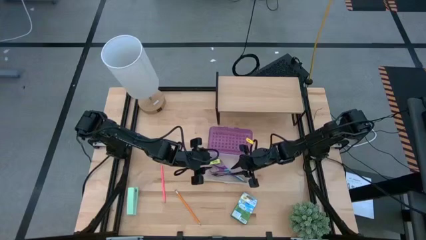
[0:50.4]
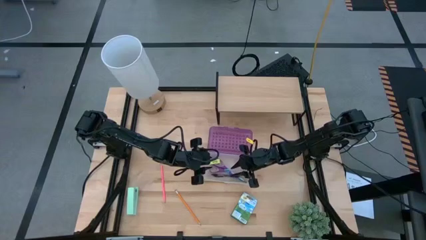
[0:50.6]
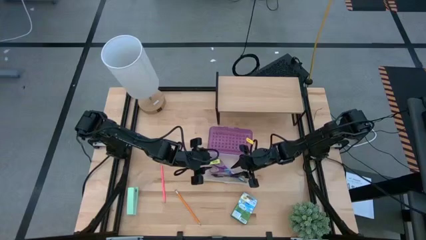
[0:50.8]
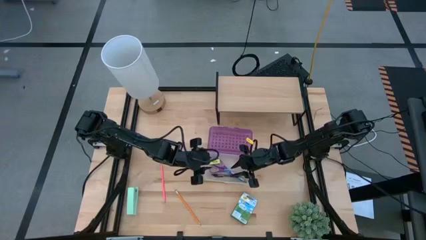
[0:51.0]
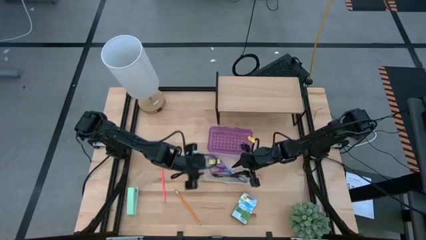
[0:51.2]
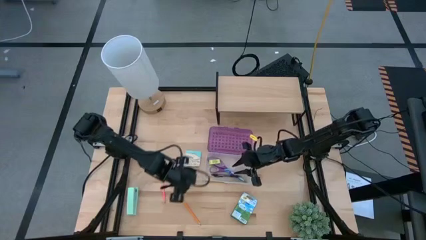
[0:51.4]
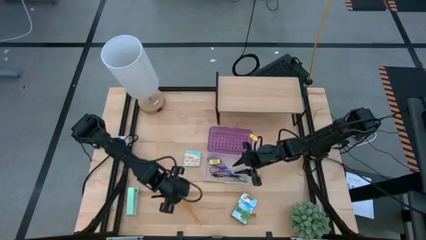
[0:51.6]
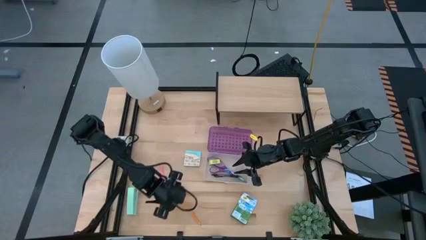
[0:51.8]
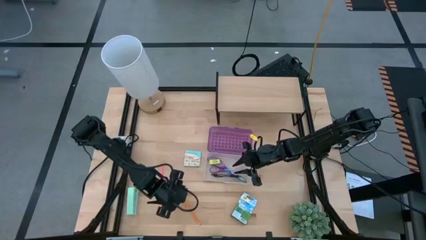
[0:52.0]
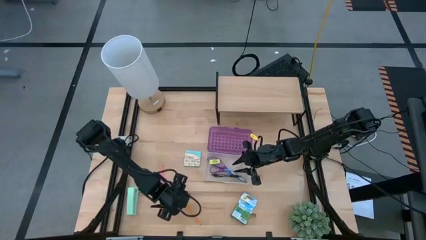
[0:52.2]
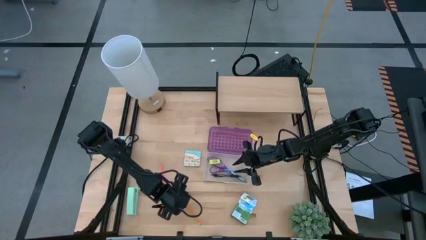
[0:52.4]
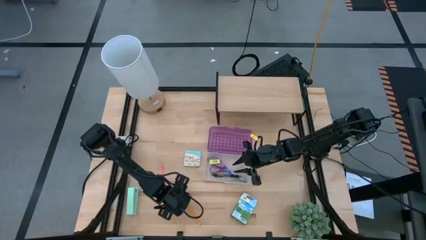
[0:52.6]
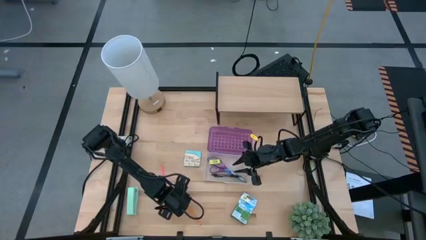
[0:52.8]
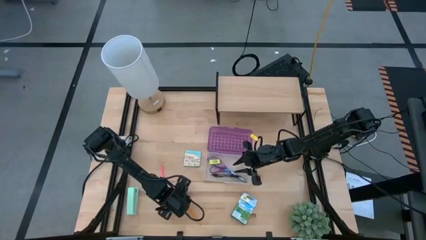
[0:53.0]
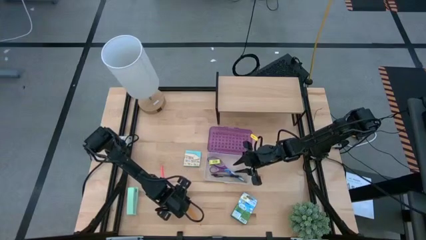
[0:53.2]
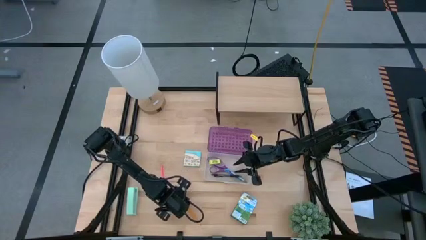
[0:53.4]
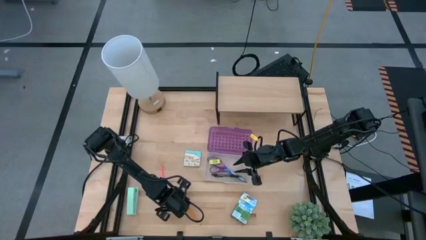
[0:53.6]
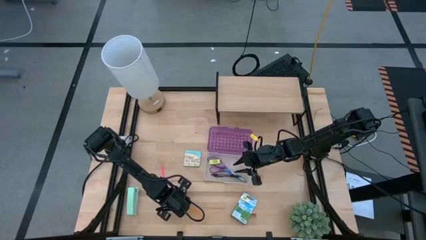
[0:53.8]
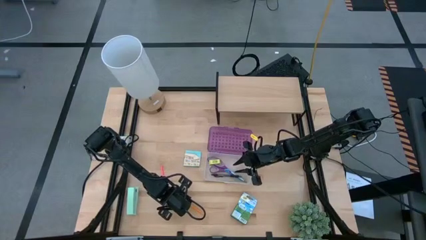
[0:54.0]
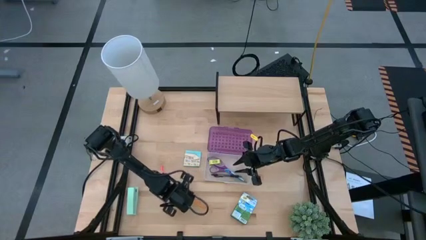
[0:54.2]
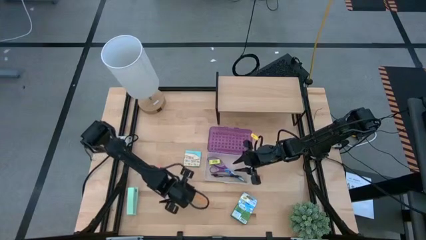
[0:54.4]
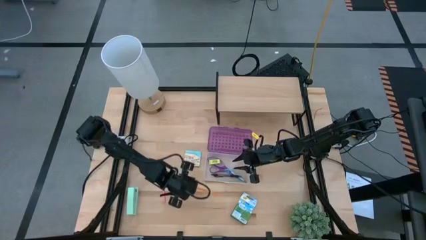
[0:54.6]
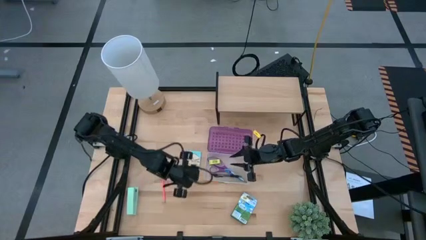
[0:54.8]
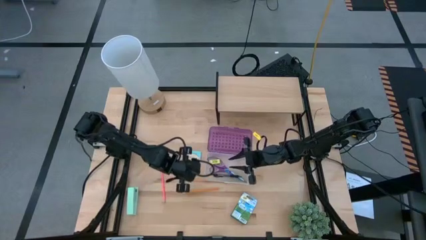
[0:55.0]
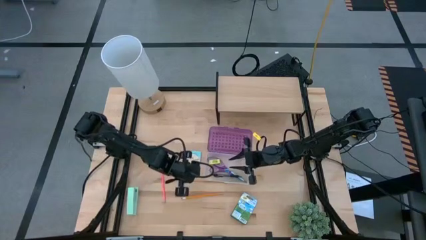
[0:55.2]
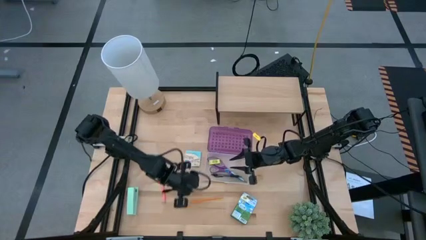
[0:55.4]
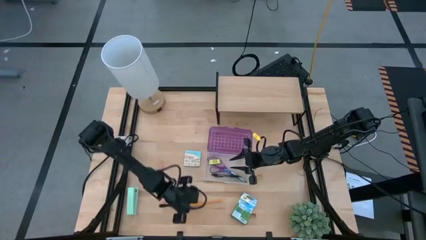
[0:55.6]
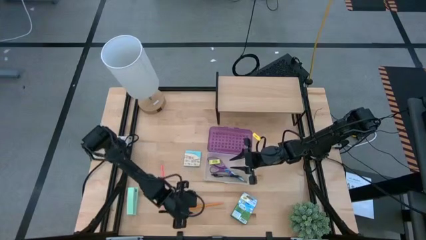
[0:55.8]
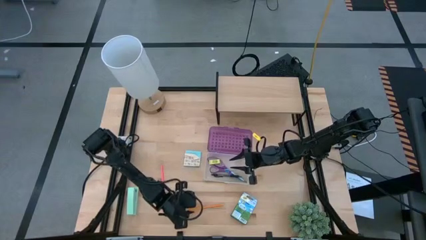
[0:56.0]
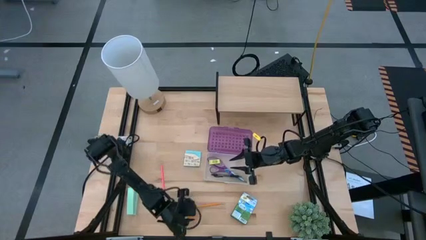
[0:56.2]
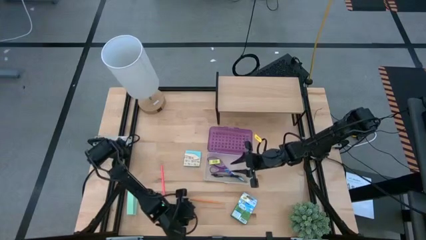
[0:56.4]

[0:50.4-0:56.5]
Task: Pack school essentials
Put the orange pencil into the purple supply box

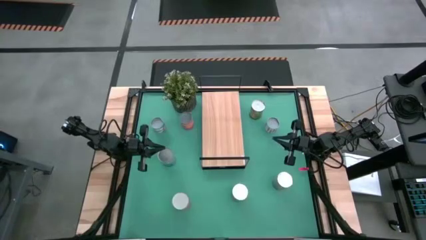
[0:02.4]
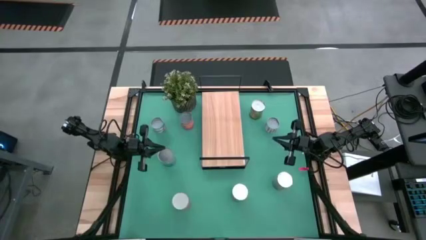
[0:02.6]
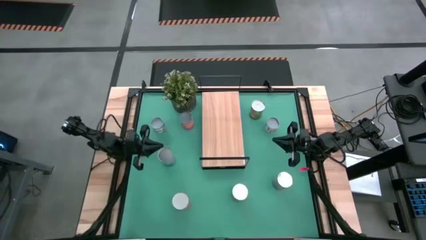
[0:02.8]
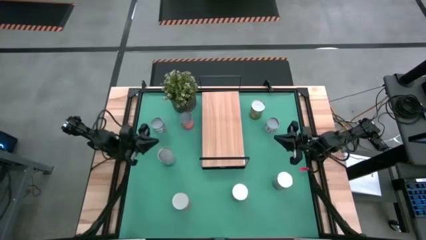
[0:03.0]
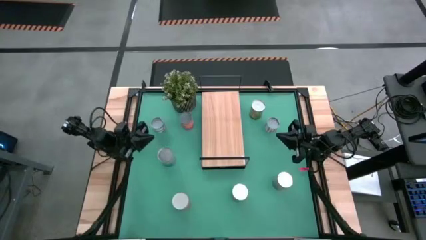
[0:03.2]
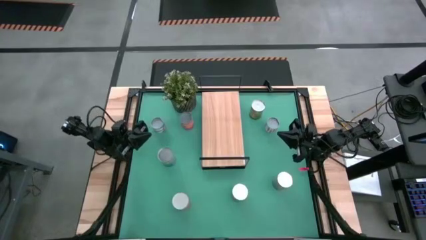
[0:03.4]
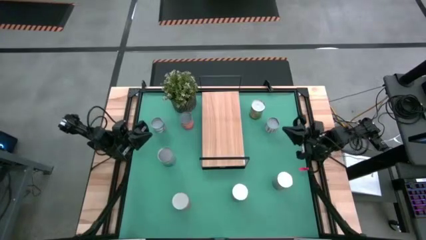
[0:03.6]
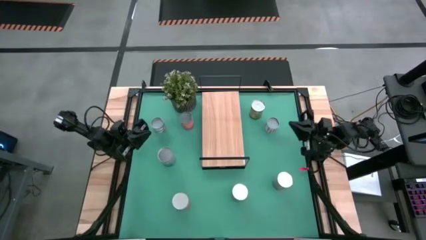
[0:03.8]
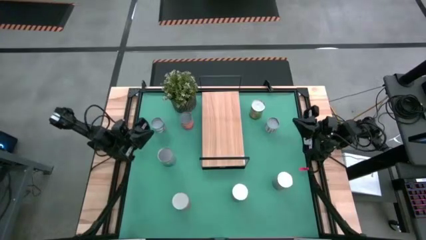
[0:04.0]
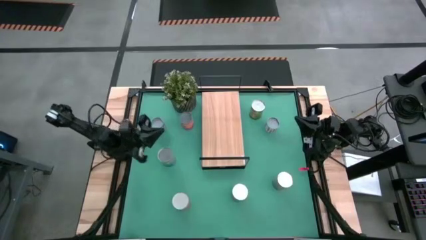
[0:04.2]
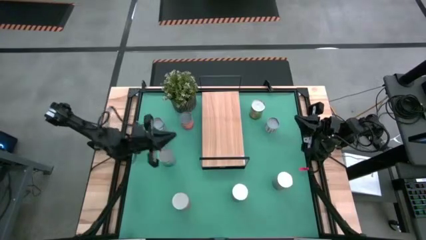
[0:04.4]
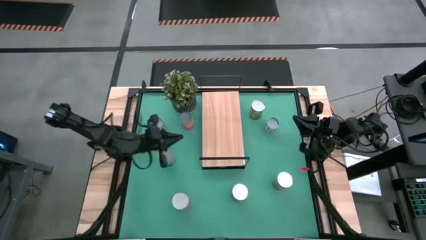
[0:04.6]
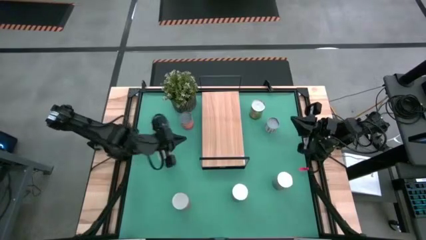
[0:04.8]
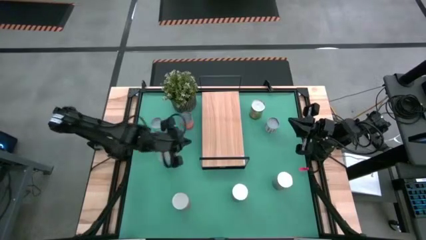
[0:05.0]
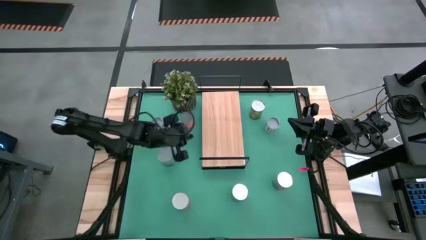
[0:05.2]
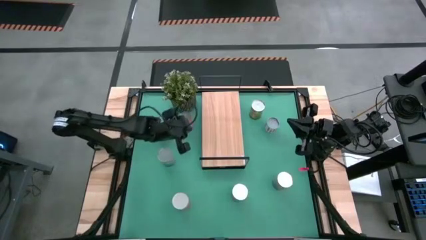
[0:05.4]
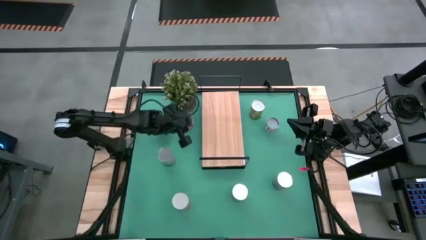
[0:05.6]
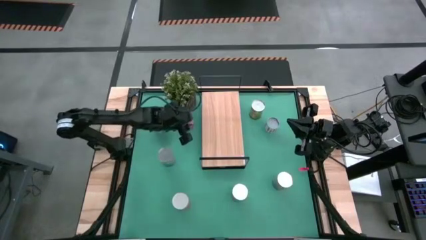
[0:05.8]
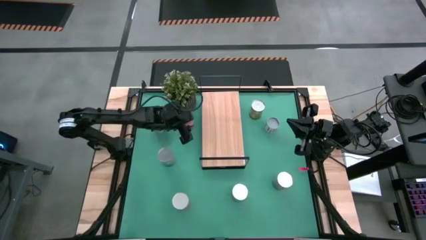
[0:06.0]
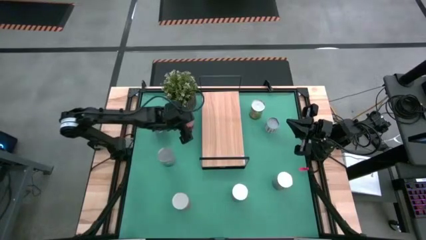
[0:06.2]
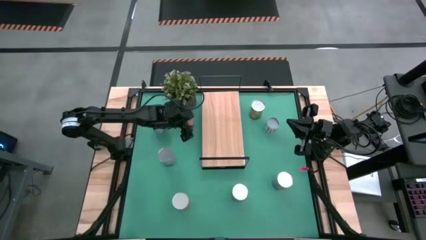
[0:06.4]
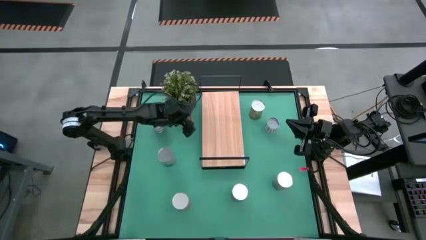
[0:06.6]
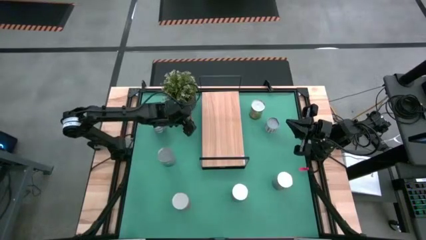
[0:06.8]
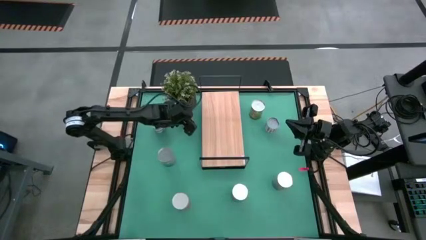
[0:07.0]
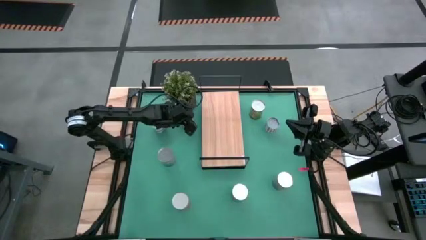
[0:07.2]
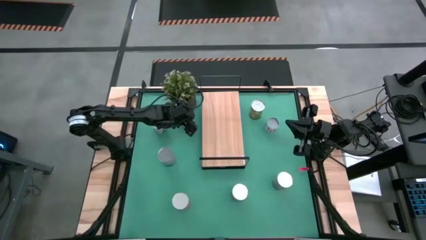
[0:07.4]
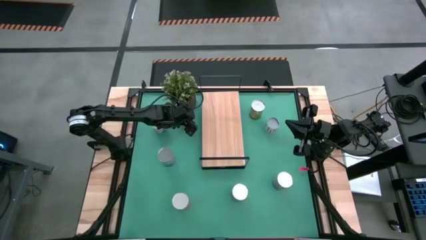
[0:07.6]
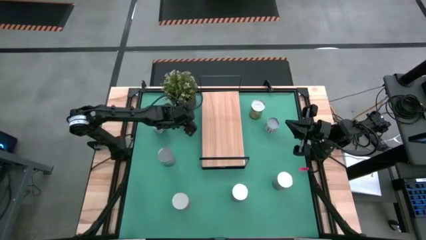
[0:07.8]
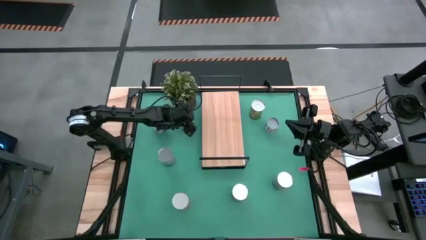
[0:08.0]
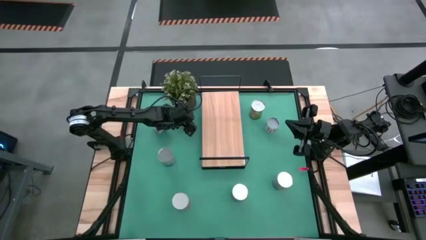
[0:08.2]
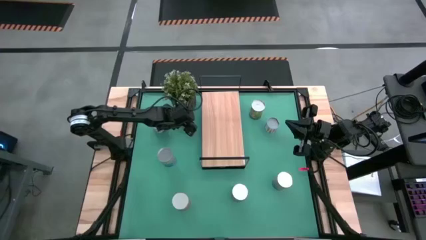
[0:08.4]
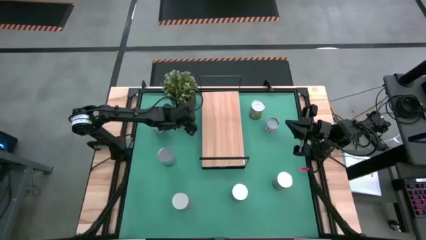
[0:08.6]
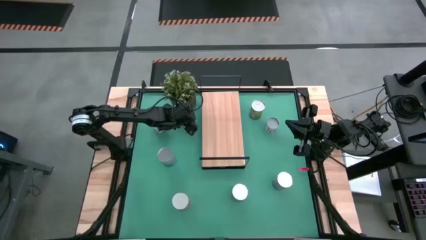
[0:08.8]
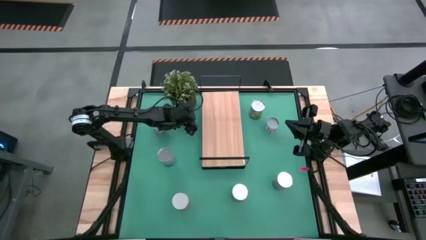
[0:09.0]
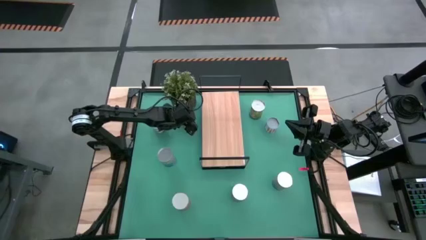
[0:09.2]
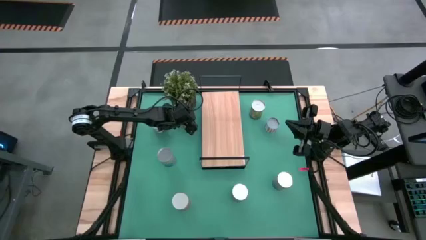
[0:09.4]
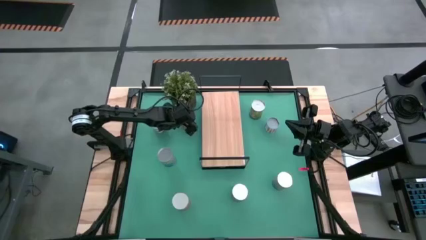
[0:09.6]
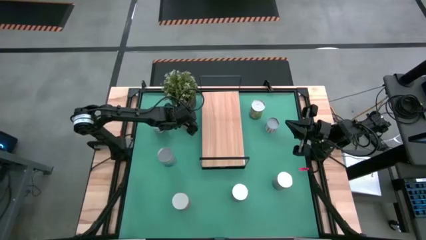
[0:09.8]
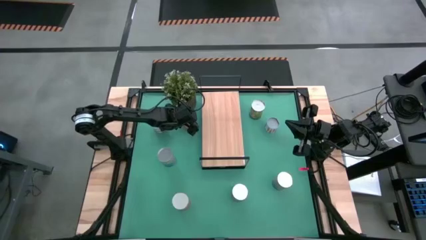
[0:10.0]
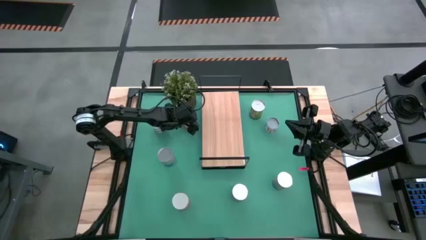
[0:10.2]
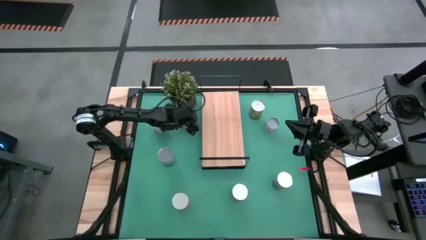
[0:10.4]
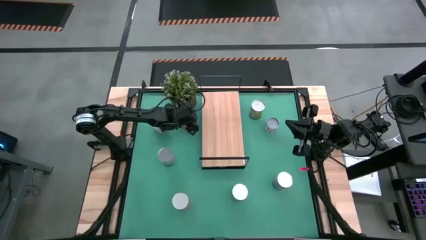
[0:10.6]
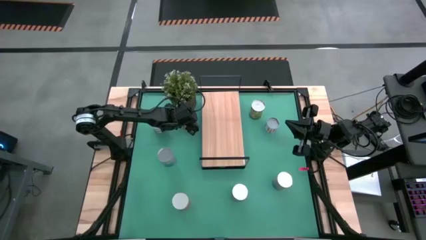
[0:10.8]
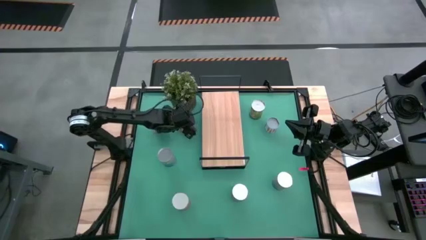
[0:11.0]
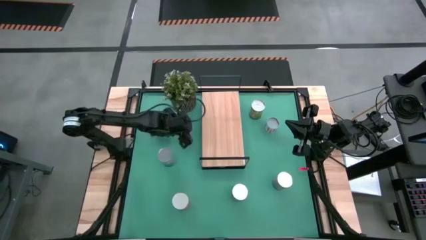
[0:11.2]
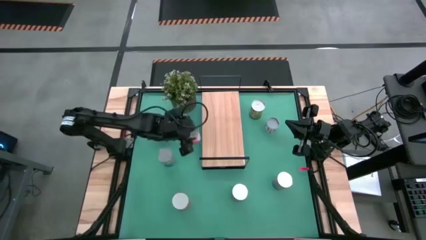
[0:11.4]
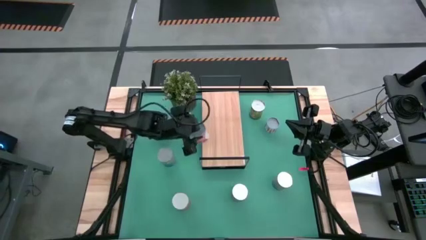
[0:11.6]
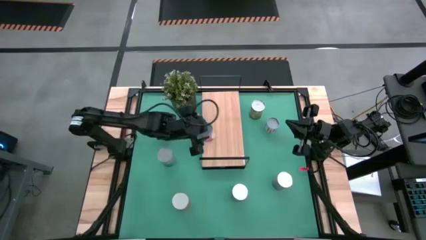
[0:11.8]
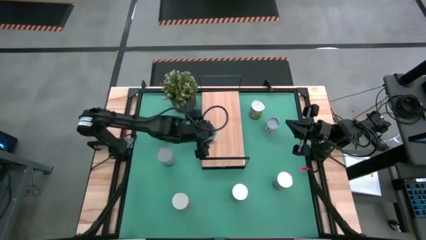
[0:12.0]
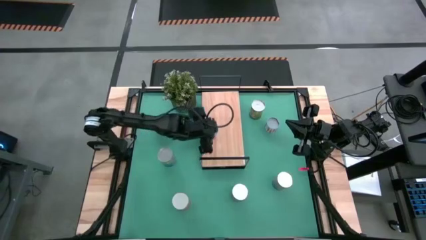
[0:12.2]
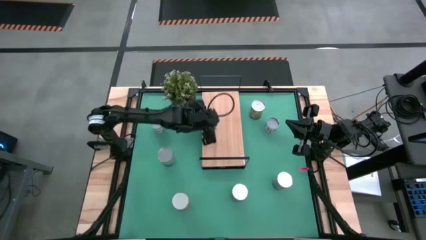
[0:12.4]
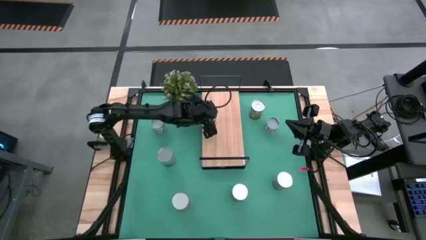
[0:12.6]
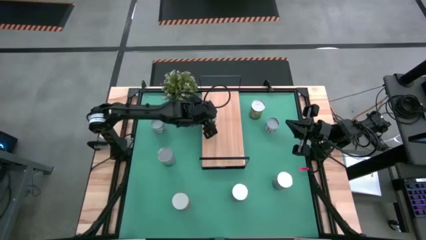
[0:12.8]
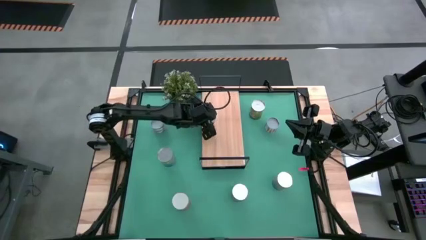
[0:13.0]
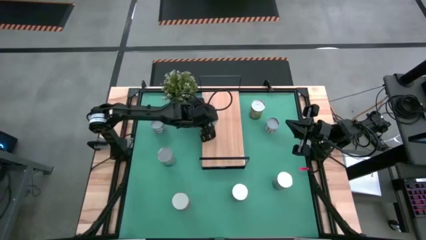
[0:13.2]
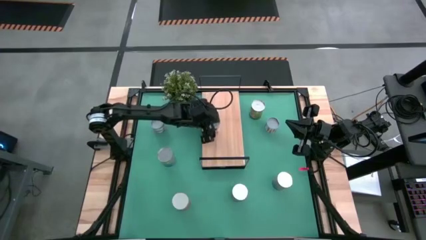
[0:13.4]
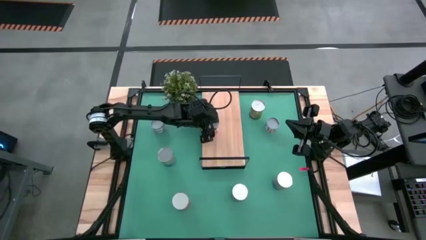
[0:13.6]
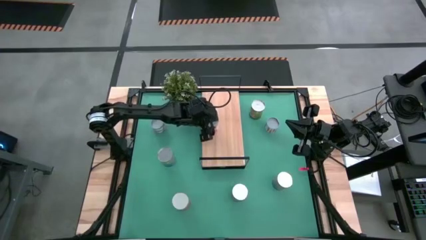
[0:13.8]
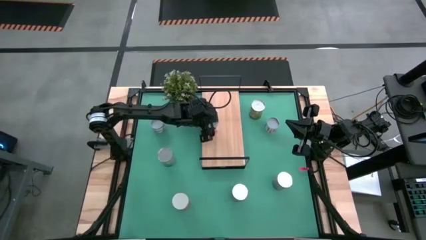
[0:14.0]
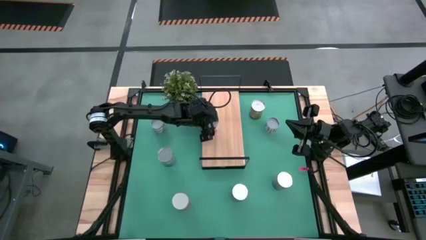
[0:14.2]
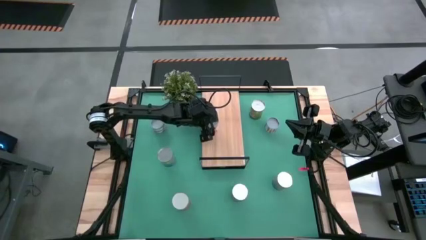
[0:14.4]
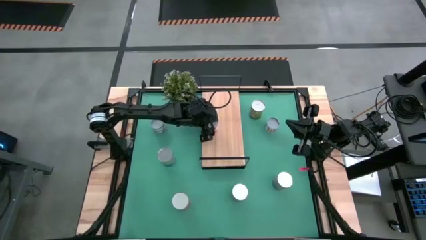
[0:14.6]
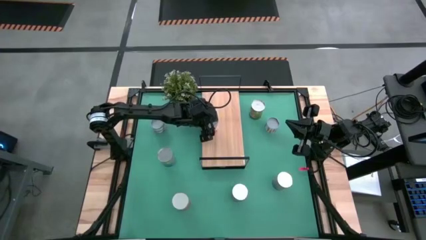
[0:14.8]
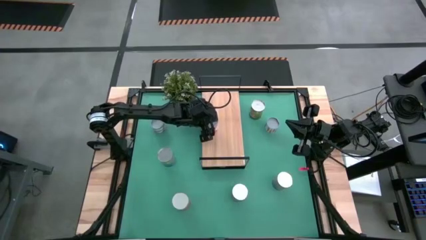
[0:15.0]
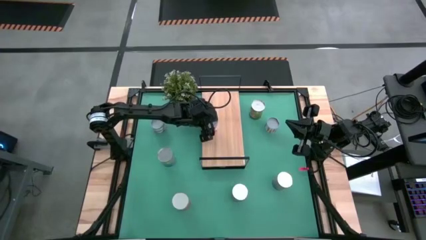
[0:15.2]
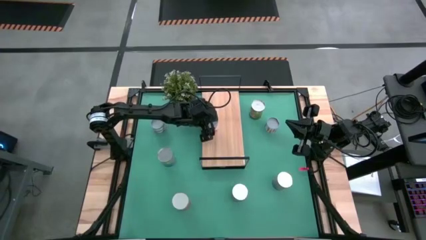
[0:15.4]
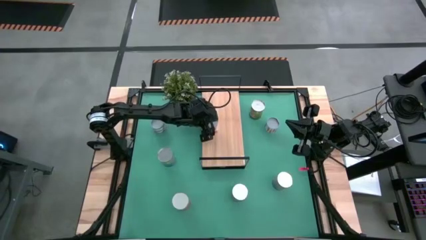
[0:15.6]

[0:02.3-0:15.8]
Task: Pick and place cans onto a shelf
Put the canned fruits on the shelf
